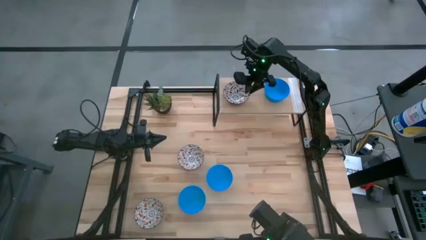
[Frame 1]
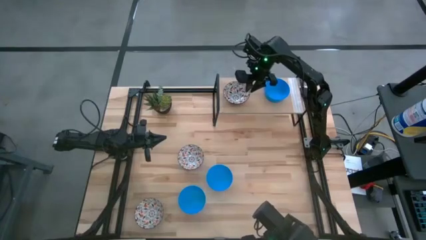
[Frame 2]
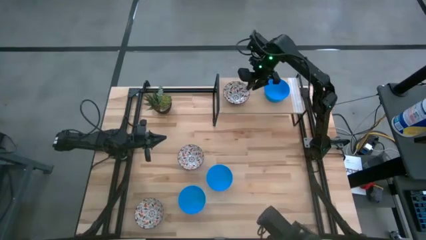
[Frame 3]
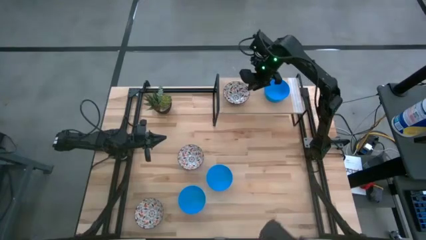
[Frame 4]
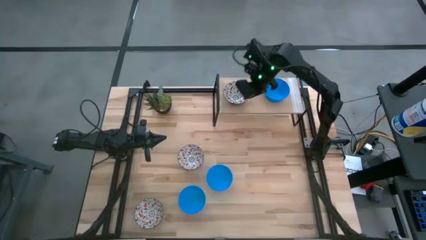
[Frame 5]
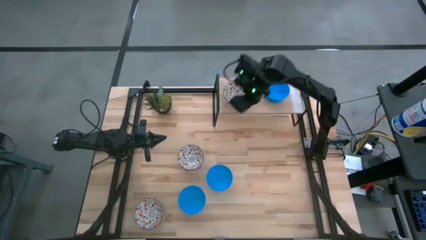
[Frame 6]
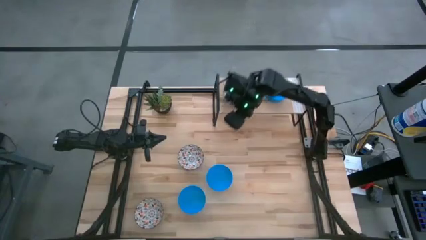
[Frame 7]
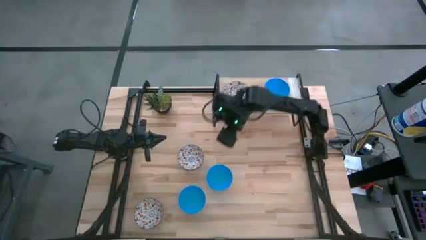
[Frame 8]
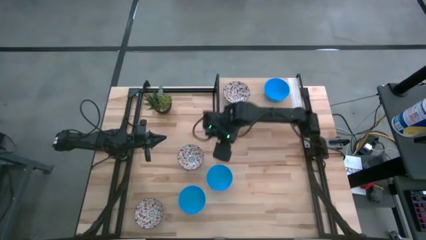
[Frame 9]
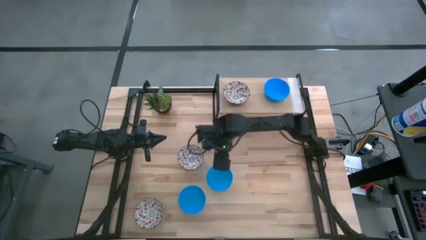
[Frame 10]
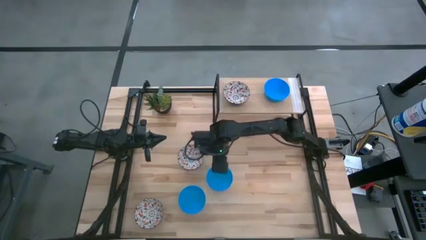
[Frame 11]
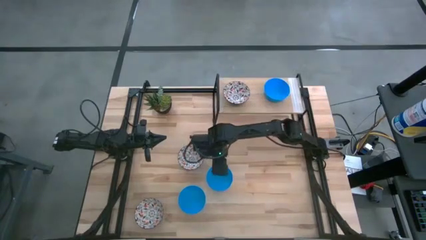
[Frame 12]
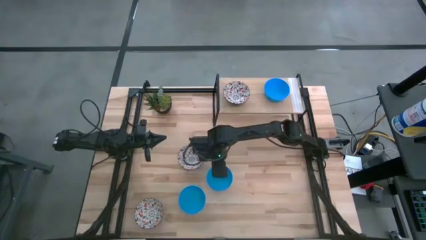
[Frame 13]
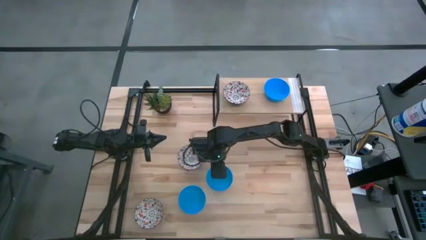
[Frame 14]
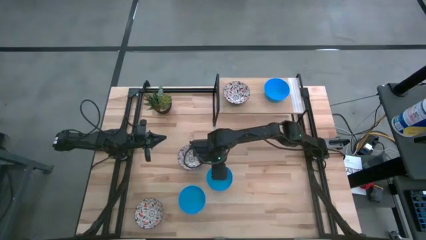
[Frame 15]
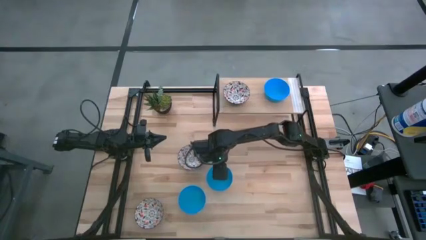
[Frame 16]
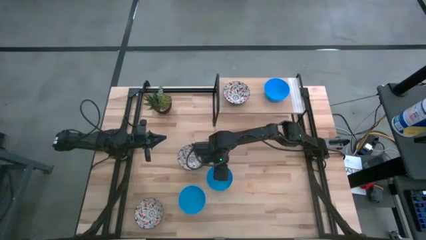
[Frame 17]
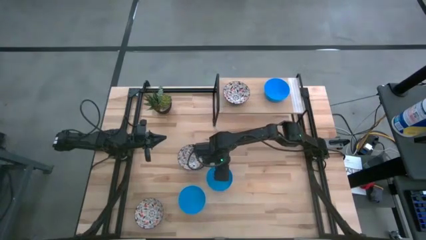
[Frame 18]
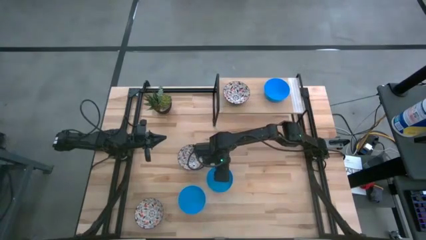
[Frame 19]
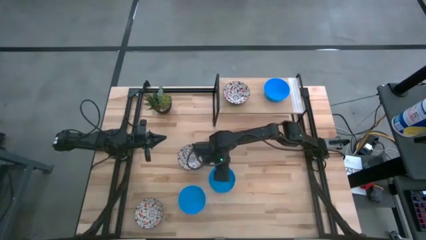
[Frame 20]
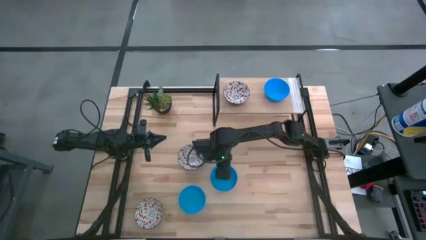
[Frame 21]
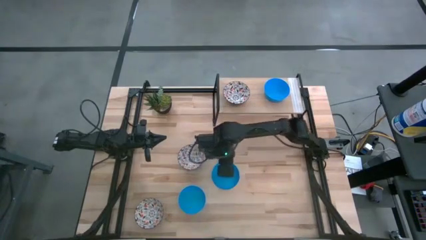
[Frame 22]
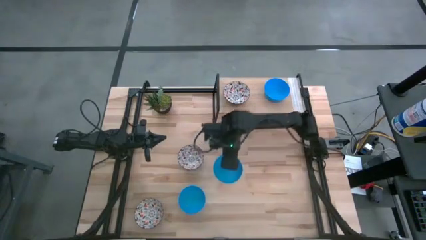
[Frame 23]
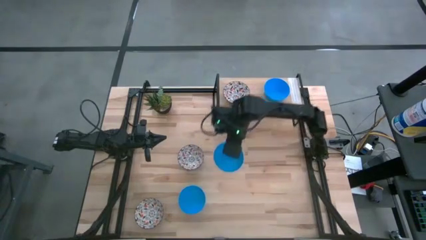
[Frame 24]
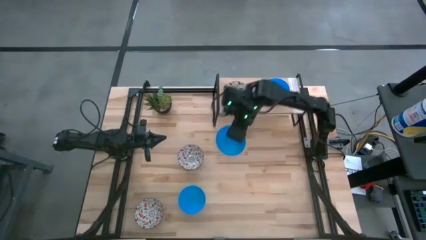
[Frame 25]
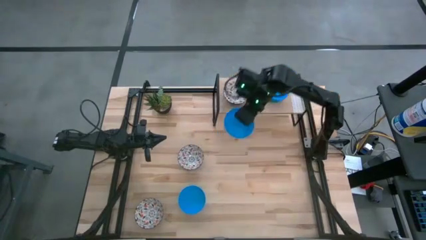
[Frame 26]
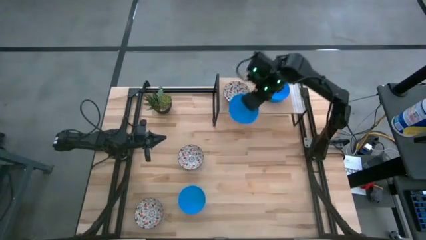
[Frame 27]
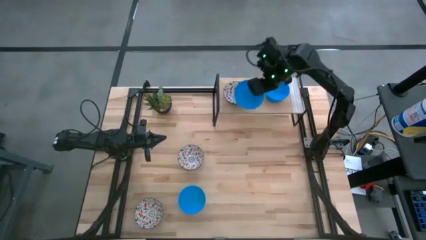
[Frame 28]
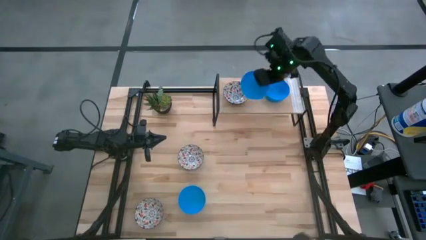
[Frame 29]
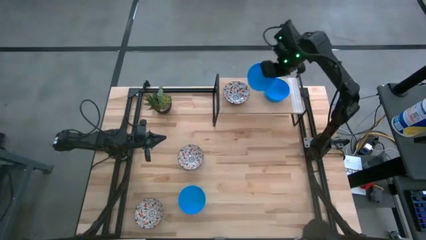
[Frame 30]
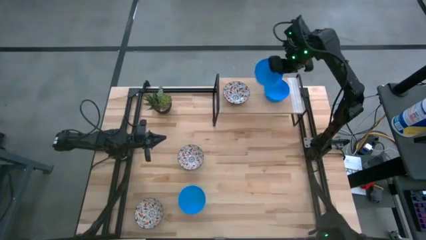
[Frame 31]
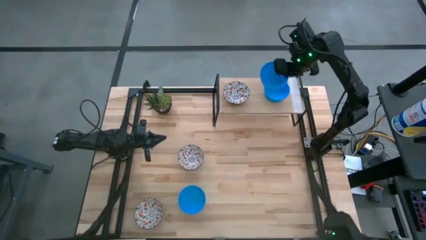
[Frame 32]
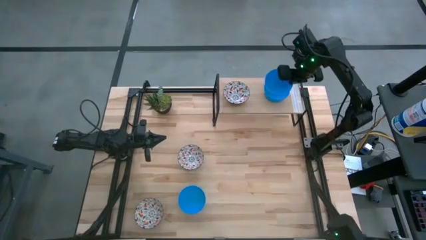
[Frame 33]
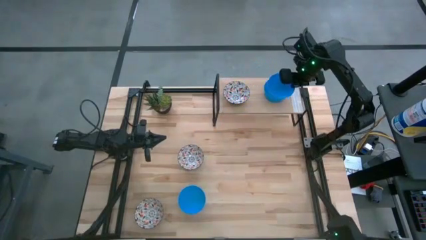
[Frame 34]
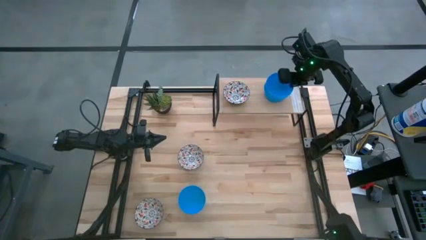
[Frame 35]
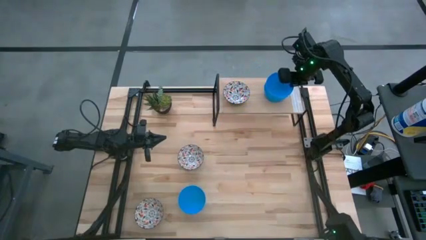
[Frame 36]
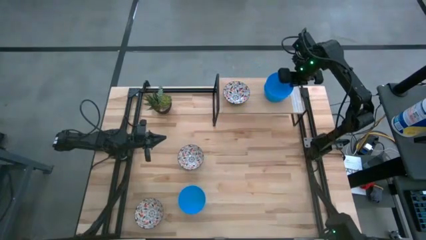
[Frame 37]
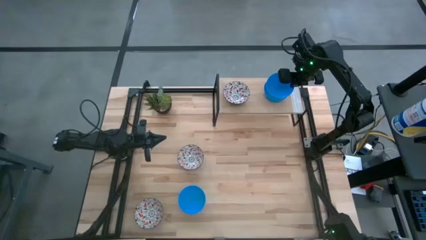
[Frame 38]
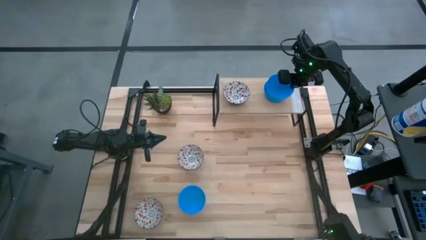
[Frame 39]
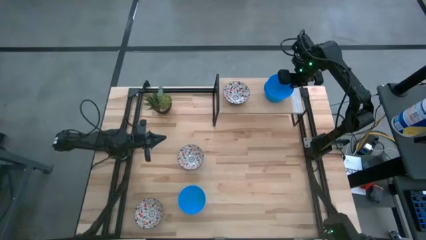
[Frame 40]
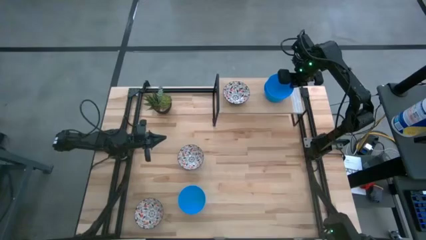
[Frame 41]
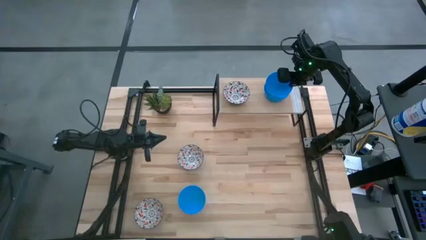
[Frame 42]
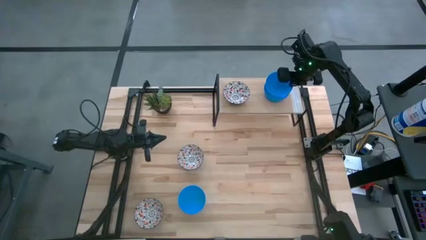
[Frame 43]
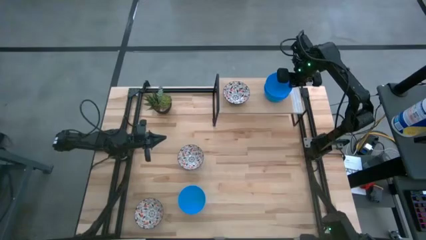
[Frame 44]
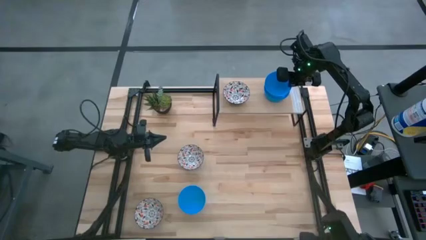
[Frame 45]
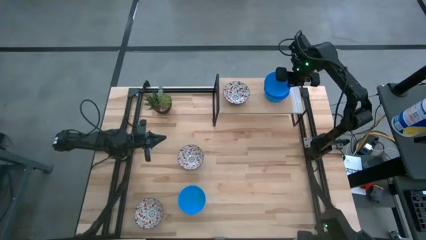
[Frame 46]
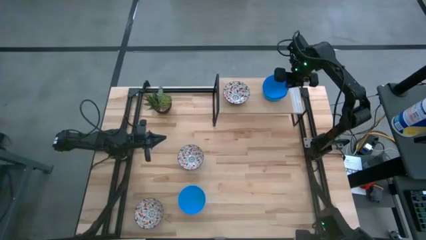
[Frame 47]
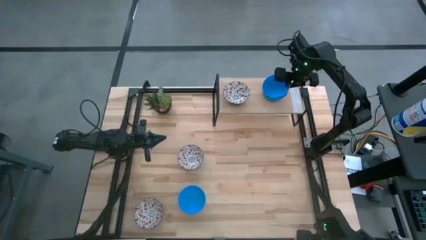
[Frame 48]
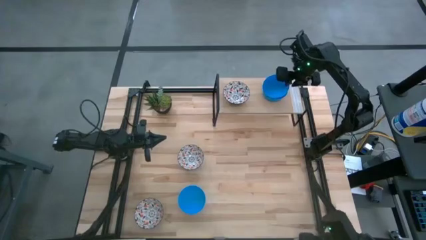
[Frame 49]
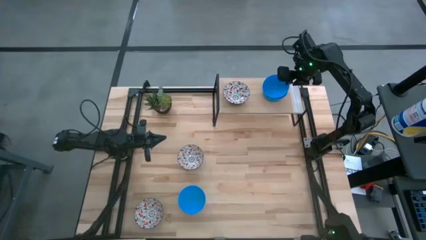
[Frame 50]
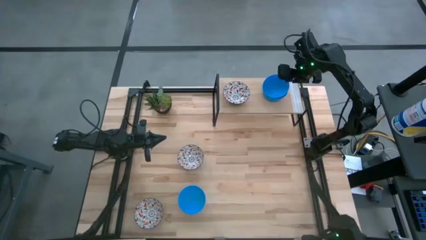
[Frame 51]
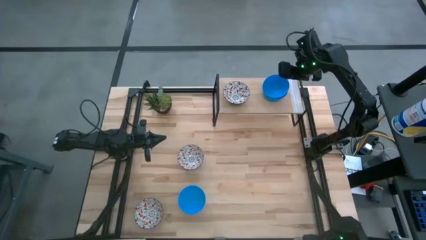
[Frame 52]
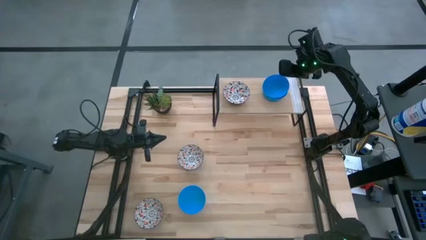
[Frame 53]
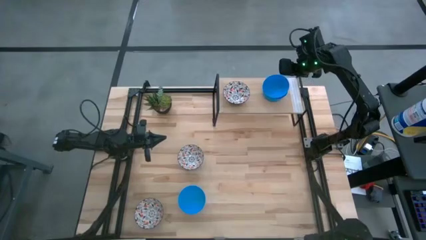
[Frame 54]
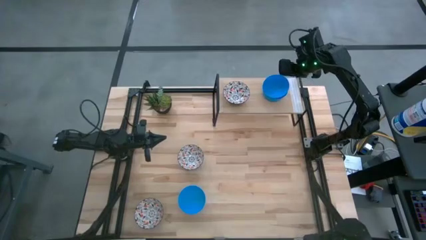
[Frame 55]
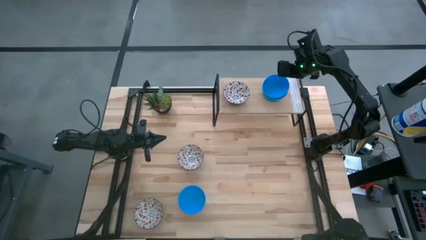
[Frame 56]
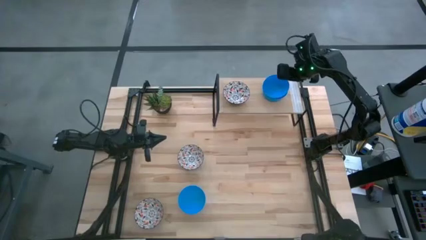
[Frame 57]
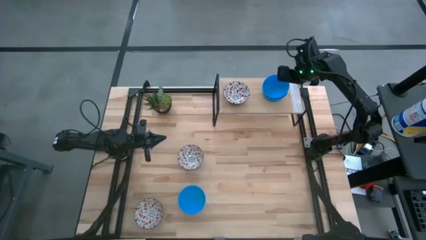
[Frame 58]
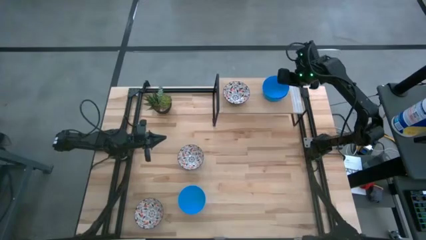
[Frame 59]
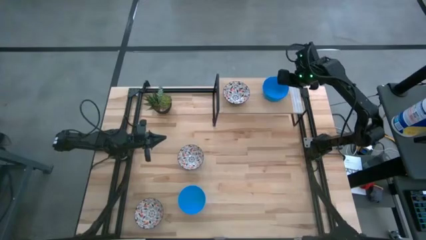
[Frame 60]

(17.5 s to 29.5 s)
Task: Pick & Place Mini bowls
Stack the top blue bowl on the blue bowl on the shelf

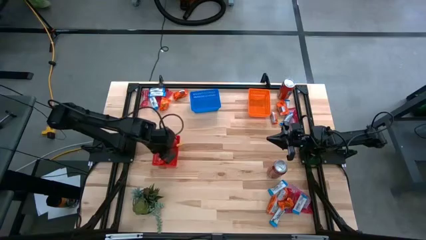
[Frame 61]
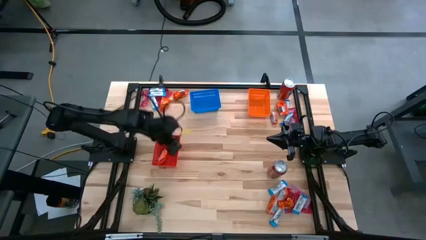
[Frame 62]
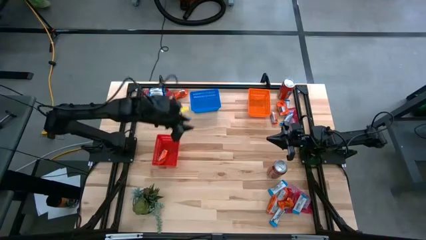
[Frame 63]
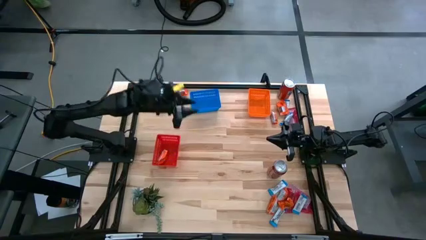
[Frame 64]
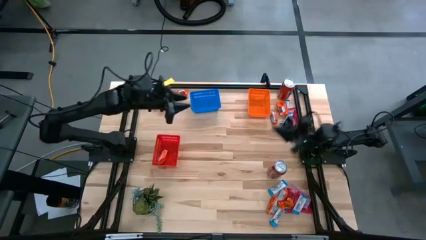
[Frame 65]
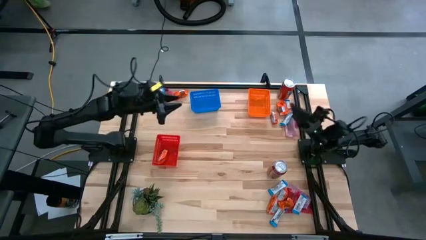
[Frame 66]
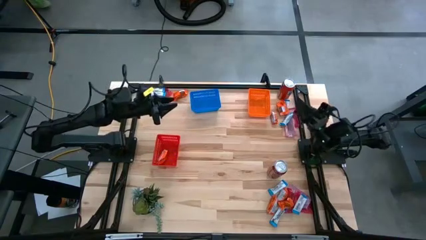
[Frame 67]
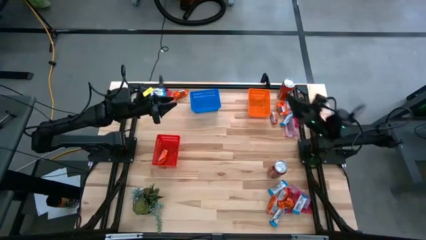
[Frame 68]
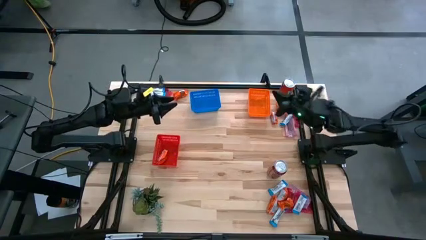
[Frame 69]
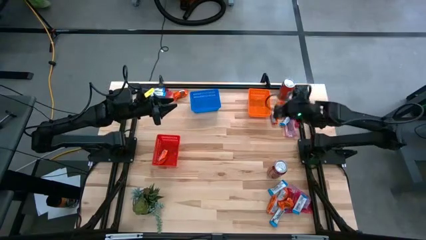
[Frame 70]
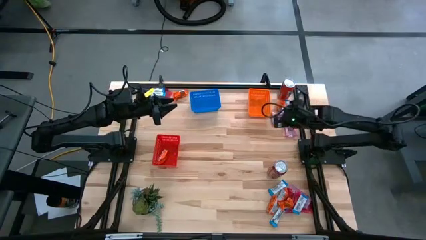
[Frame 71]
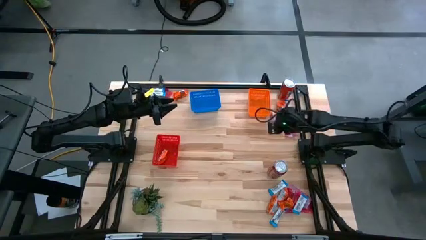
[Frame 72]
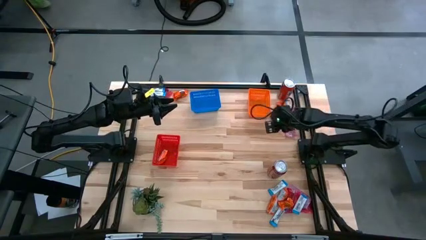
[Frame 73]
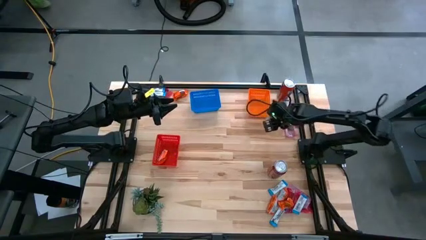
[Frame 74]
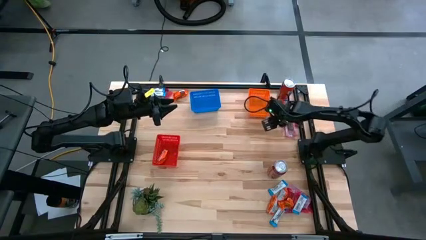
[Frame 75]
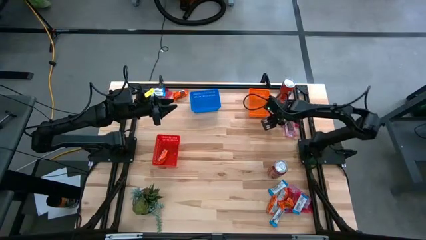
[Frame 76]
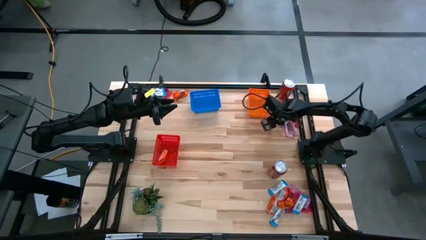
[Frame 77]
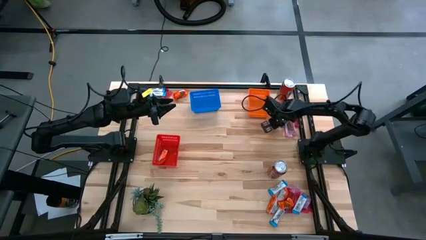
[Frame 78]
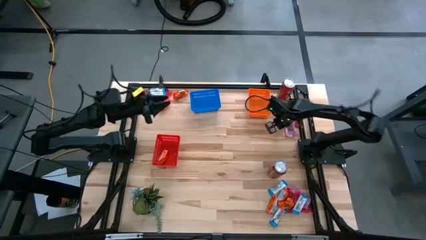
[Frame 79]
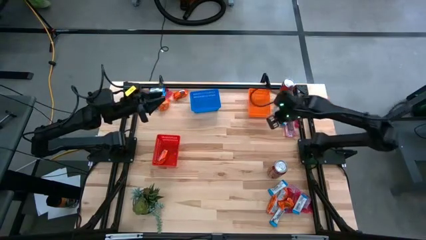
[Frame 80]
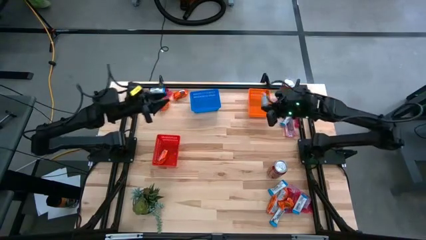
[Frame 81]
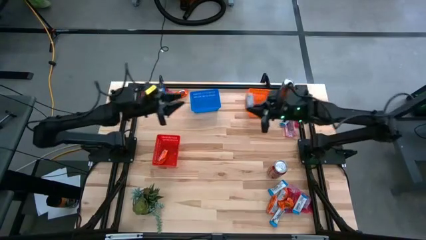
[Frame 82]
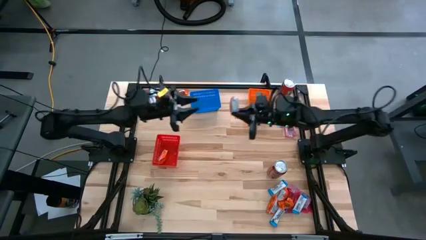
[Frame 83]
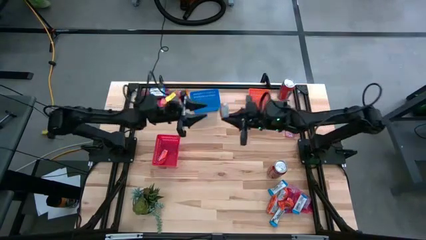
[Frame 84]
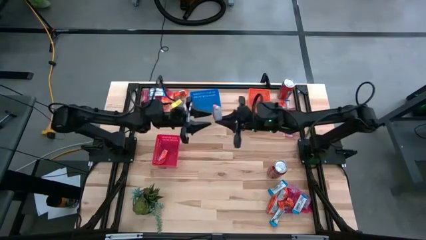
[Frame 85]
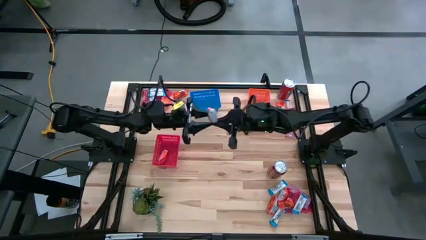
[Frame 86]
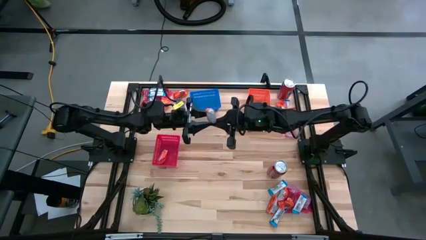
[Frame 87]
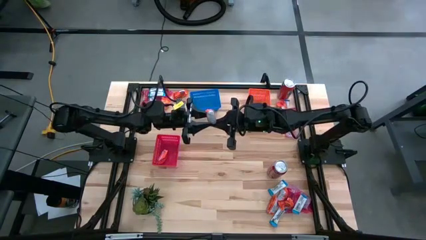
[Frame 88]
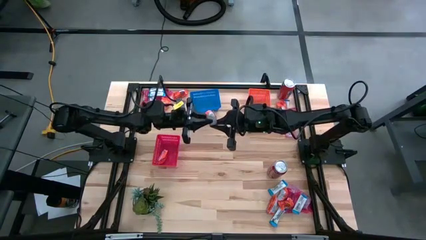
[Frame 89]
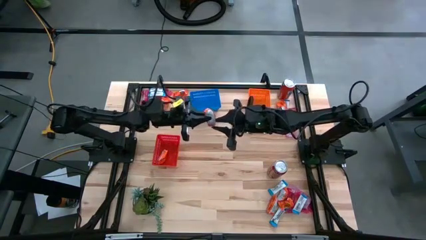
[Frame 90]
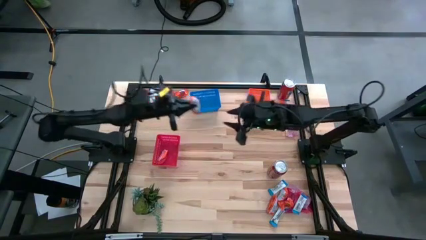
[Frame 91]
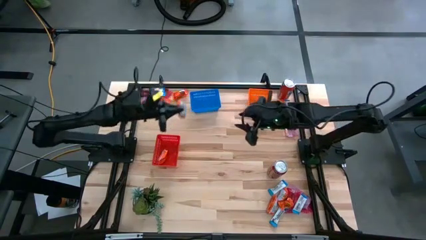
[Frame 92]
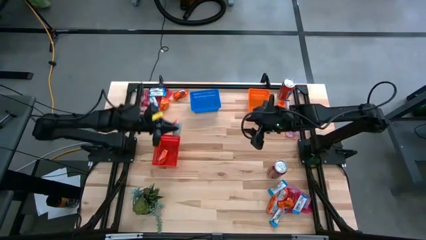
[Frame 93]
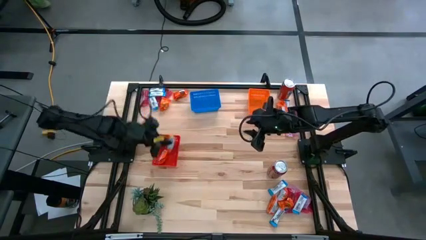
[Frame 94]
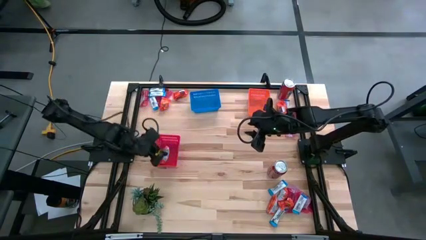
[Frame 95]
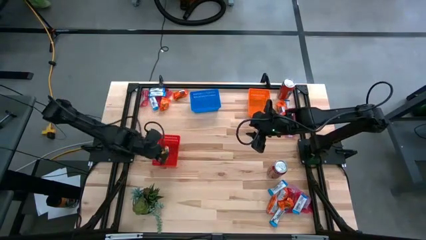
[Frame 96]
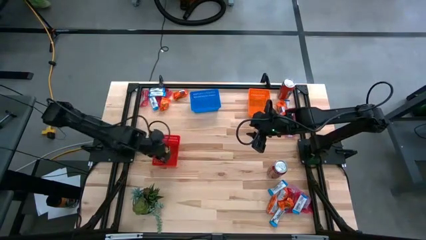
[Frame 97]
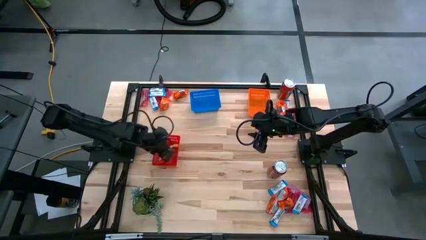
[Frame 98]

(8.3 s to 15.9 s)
Task: Sort candy
Put the orange candy pack into the red basket
